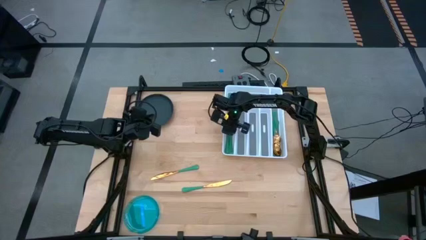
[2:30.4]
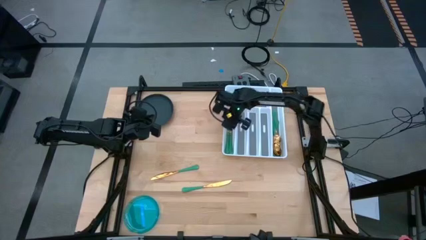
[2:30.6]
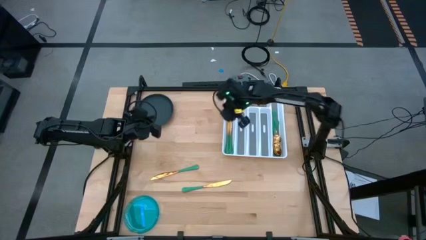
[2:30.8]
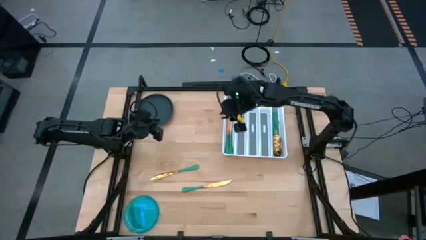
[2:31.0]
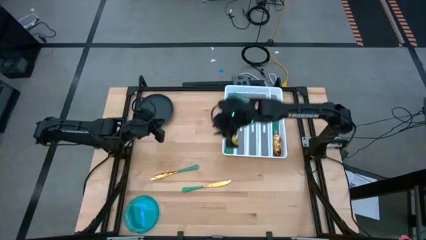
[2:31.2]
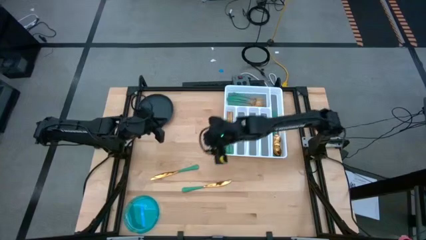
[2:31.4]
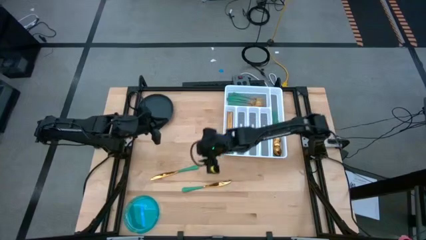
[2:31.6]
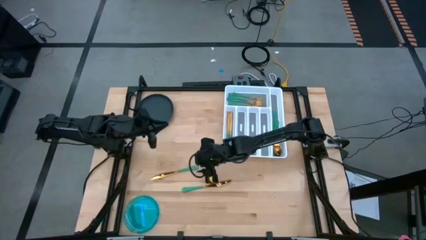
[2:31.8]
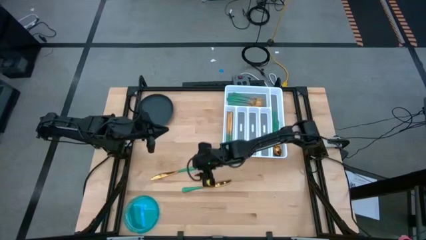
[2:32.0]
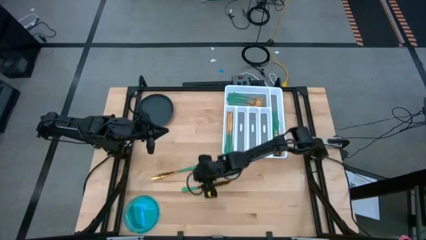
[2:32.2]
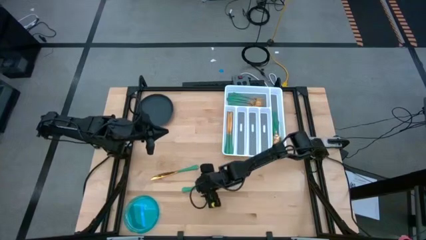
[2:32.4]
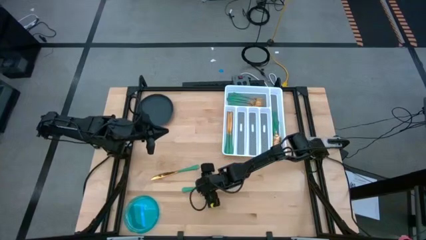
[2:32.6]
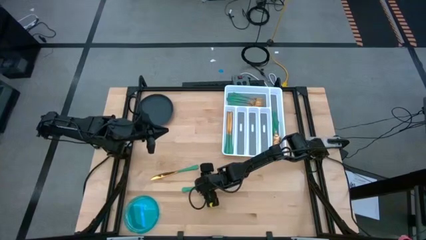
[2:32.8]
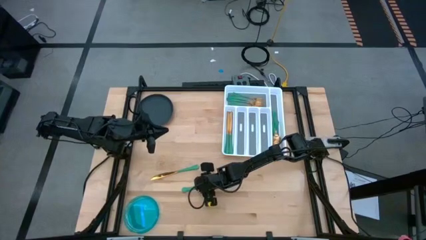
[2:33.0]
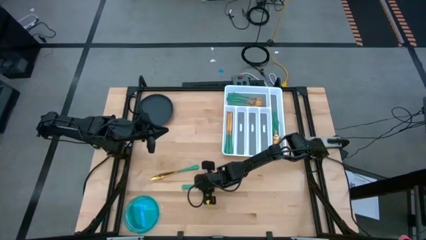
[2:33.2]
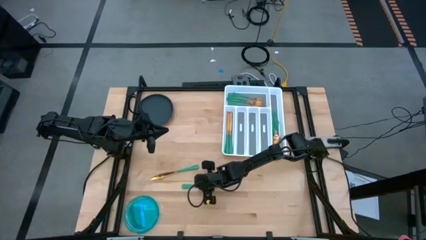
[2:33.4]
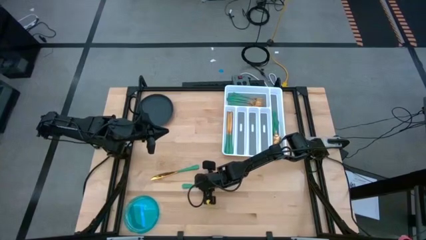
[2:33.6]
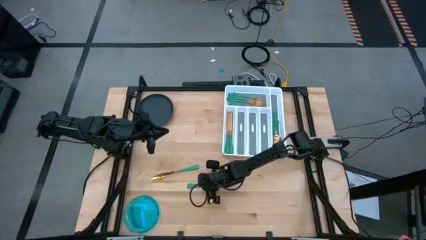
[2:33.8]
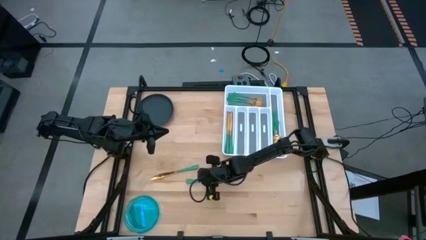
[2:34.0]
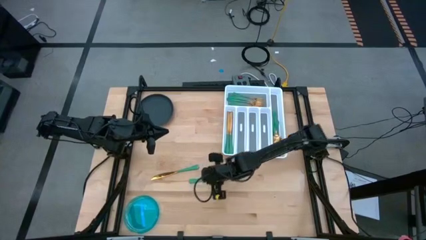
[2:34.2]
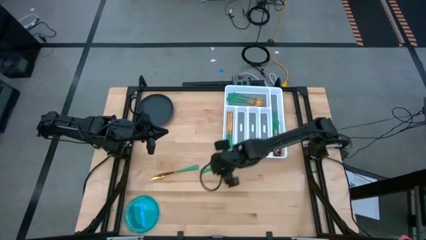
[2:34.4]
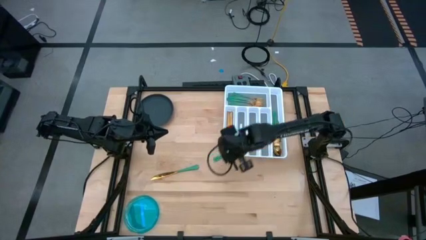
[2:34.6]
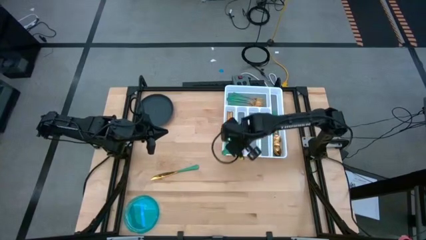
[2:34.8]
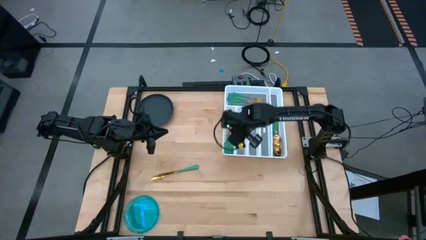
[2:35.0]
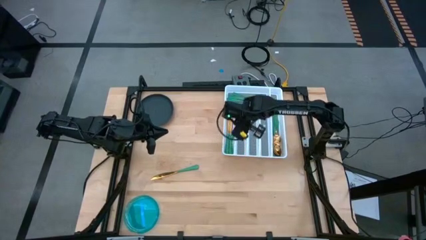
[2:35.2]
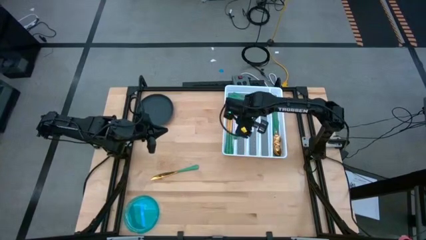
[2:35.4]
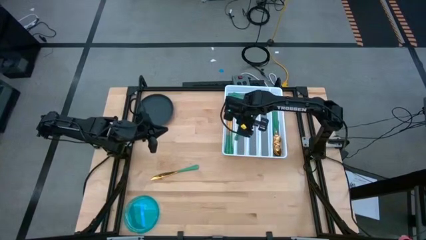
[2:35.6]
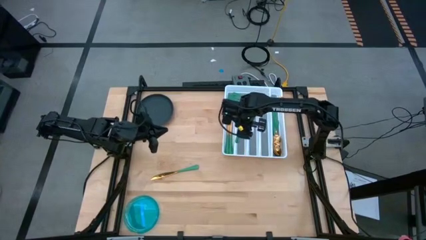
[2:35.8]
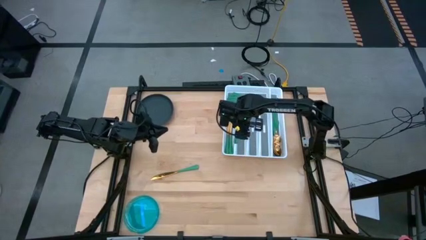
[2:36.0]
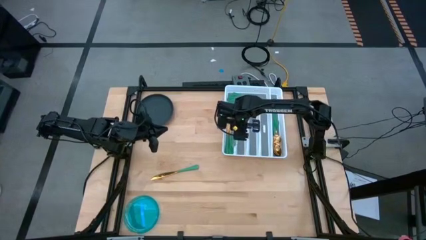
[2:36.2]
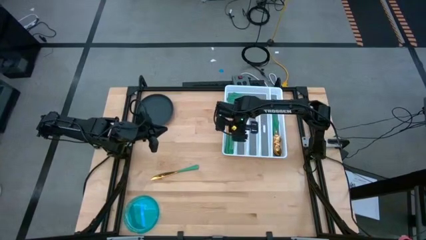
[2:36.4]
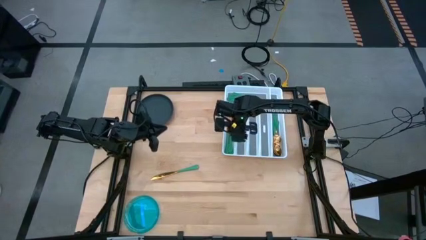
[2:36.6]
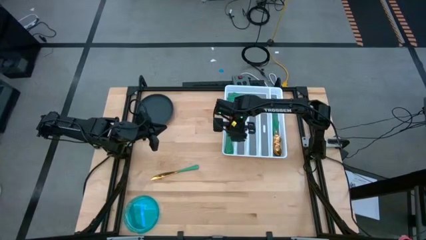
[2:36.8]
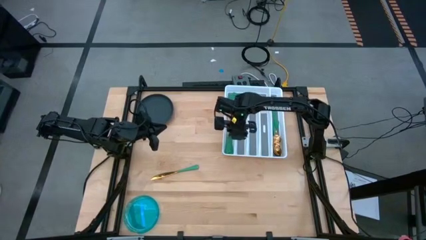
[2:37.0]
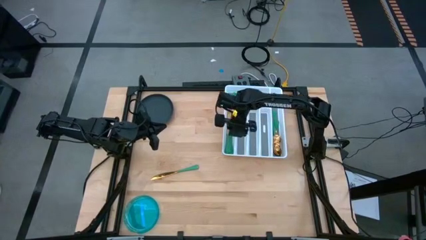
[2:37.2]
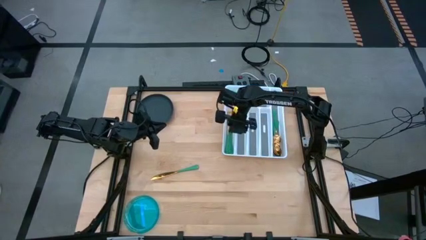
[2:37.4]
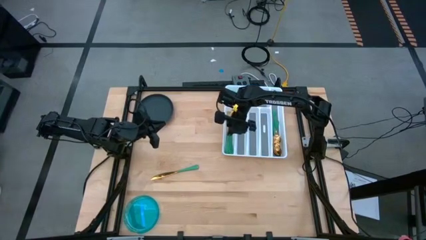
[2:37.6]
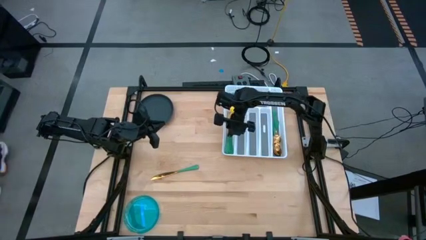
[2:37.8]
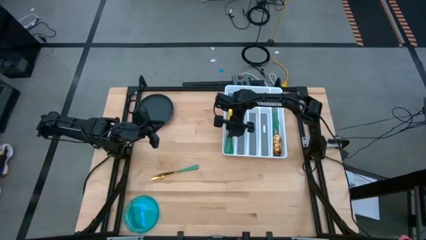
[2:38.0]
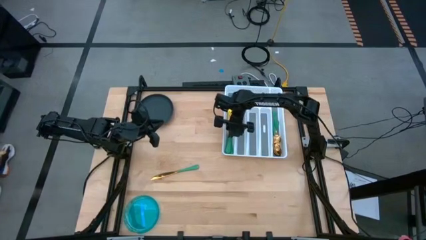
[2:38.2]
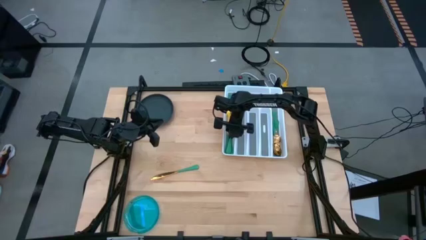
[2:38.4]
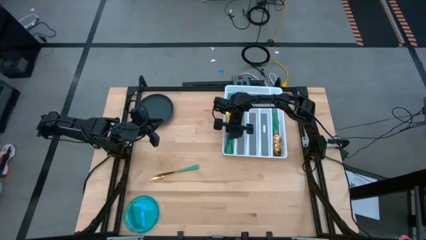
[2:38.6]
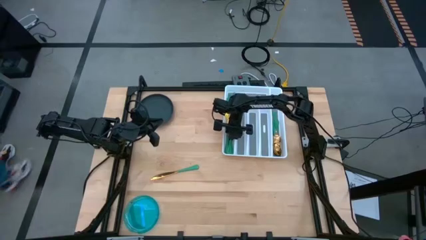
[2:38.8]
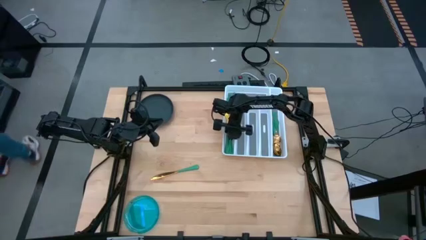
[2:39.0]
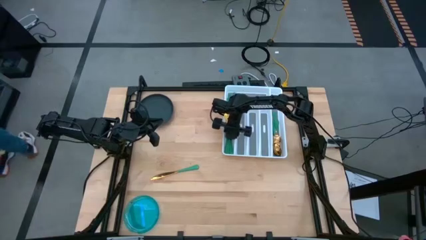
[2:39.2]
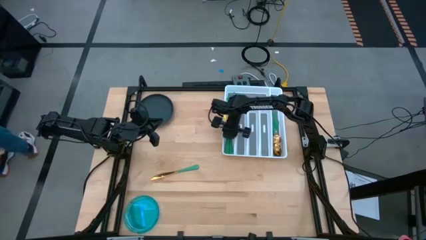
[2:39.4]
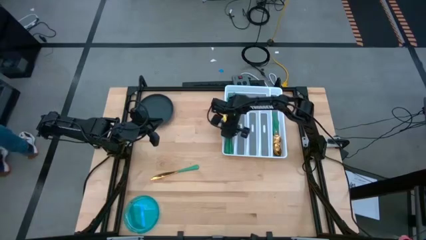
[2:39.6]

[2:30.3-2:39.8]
Task: Sort silverware
Put the green knife into the silverware tray

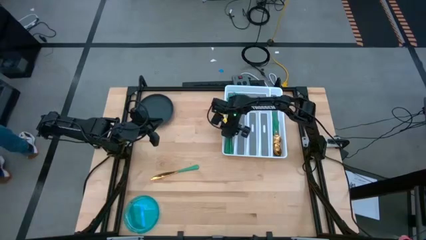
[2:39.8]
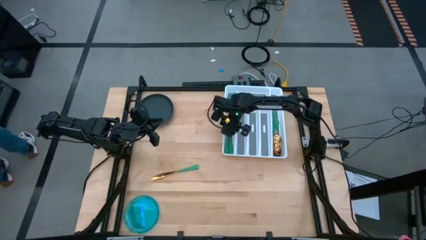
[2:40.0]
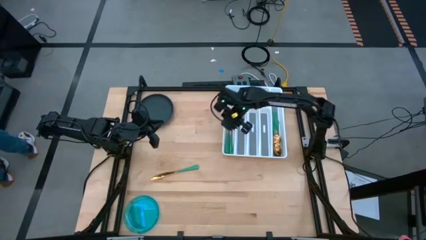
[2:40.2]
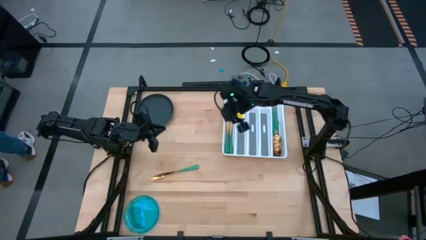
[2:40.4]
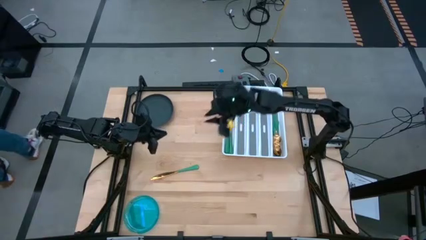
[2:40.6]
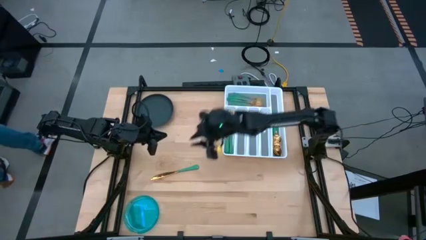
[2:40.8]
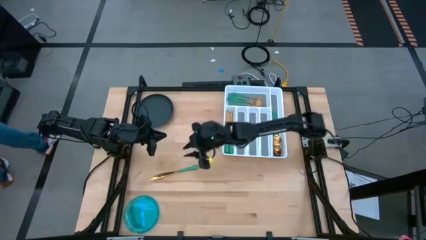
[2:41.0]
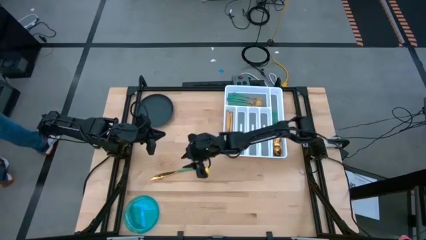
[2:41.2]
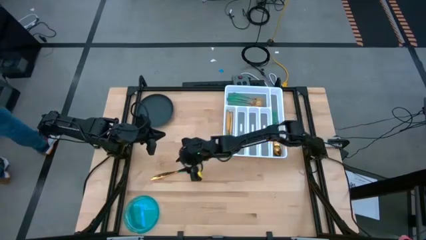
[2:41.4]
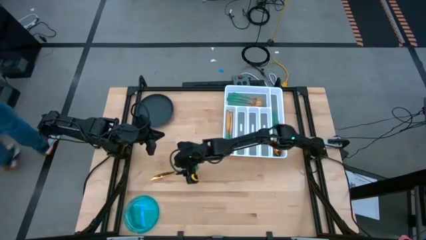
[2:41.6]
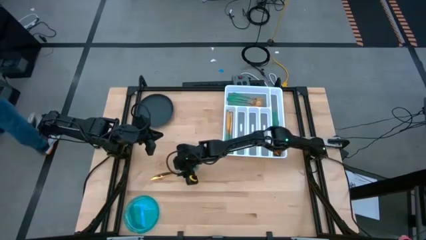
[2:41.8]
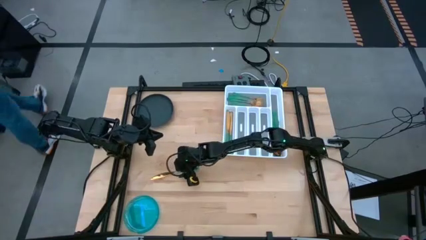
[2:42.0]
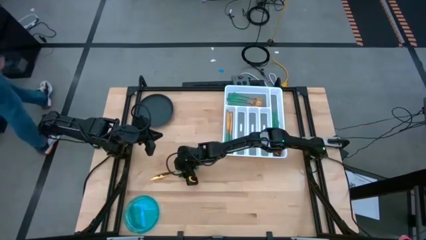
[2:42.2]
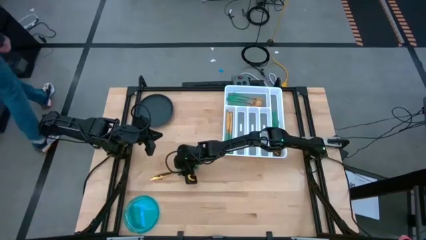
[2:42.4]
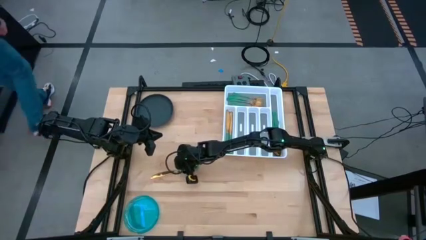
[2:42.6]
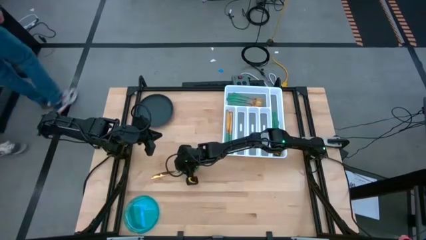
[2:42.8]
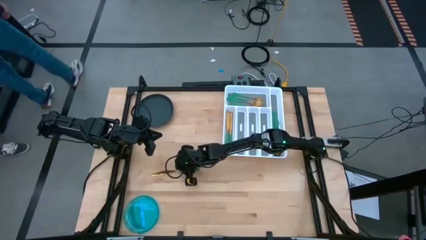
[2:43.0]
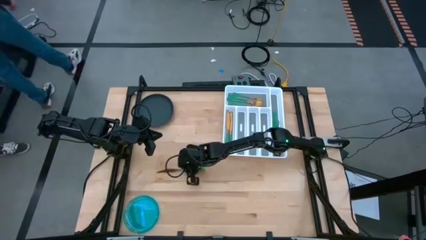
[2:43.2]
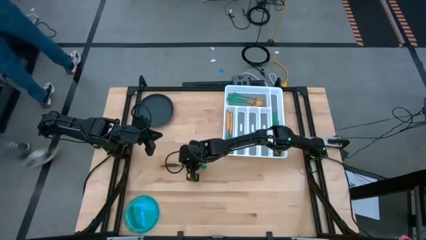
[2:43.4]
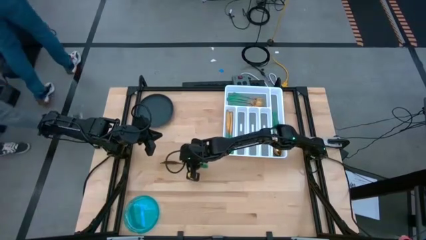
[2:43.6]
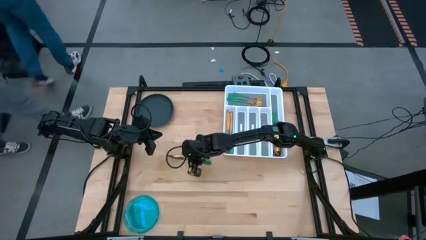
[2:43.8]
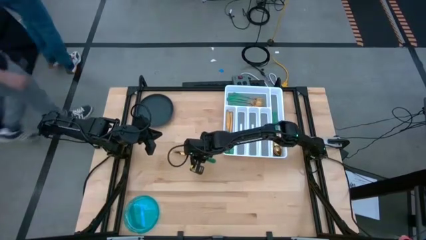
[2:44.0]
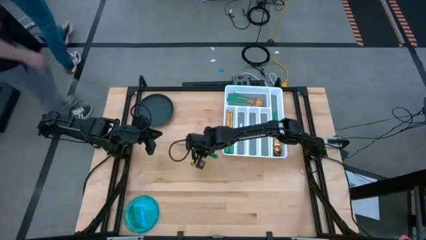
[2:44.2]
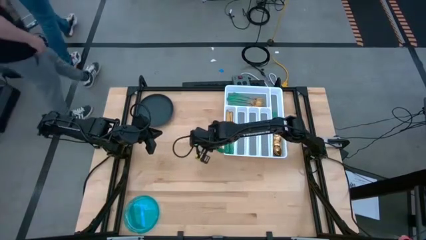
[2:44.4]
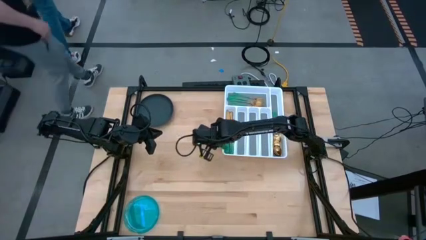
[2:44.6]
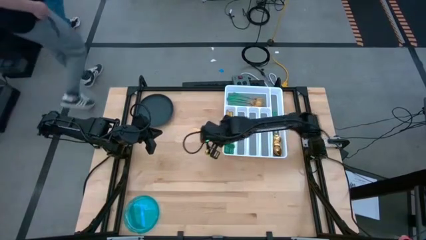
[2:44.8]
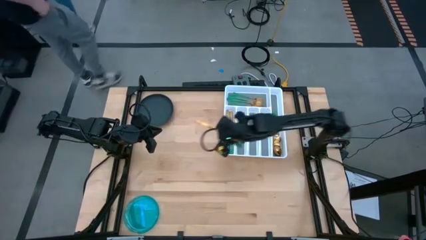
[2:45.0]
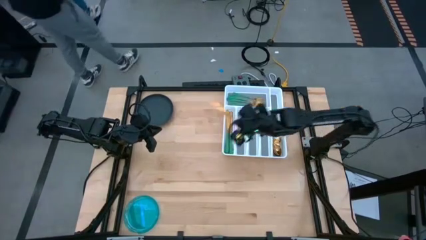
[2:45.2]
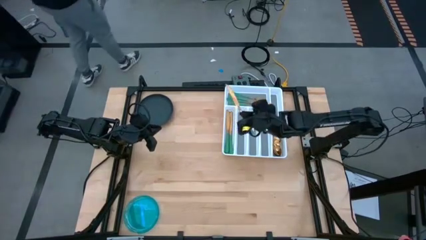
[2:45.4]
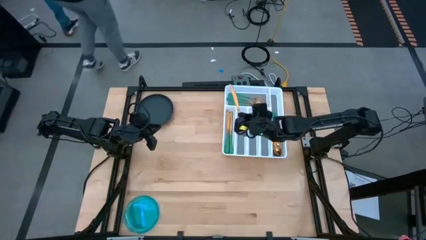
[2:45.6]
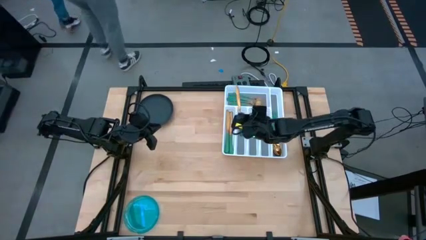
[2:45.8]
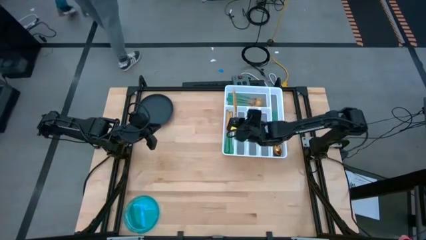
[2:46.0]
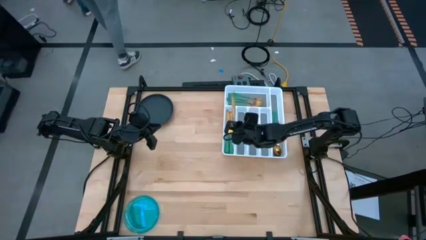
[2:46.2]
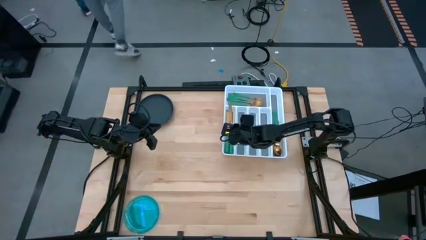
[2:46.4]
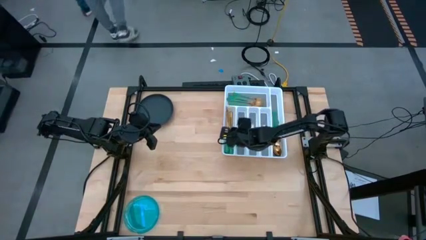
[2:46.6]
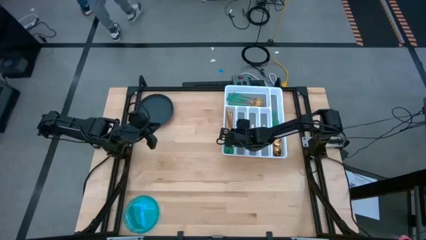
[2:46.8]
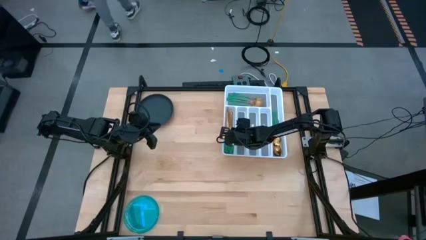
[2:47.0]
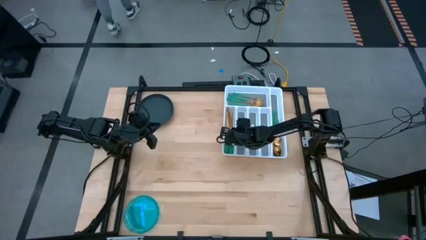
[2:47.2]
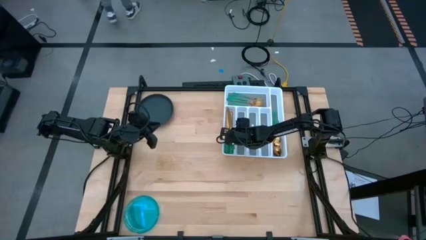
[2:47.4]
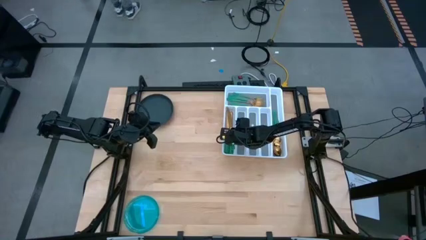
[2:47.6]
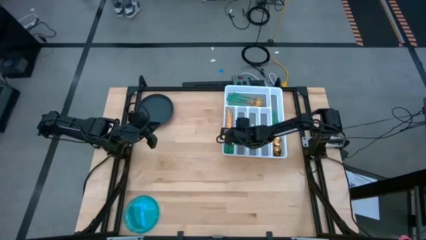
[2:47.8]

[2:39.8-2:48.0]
Put the green knife into the silverware tray
